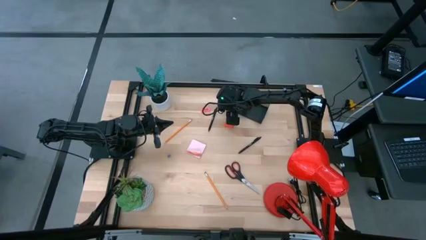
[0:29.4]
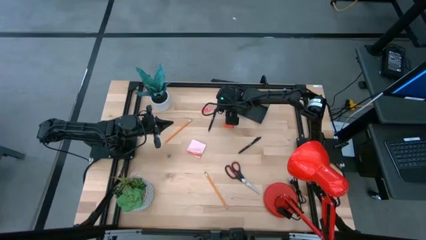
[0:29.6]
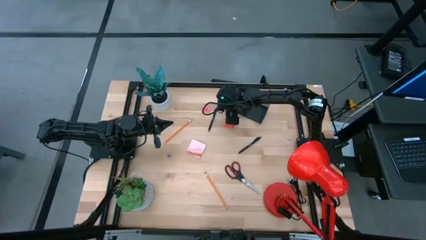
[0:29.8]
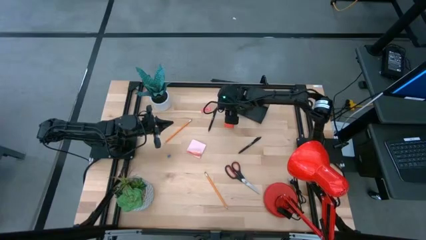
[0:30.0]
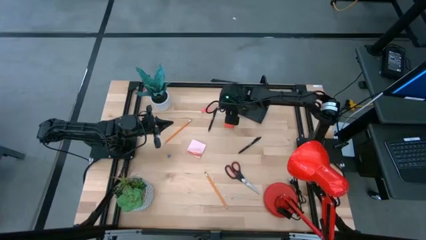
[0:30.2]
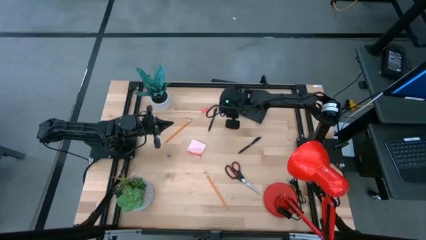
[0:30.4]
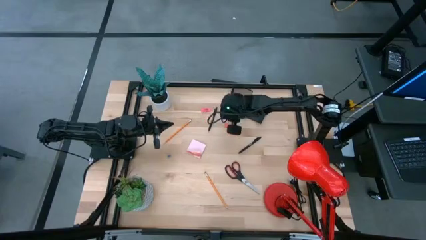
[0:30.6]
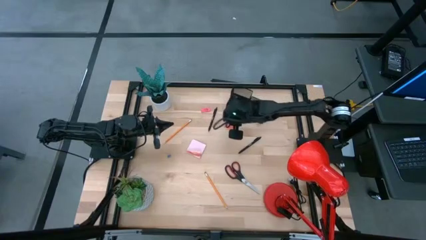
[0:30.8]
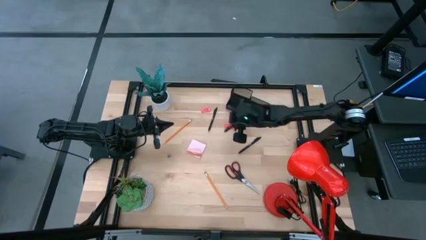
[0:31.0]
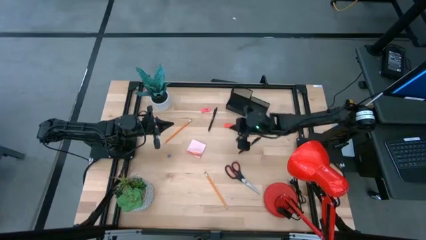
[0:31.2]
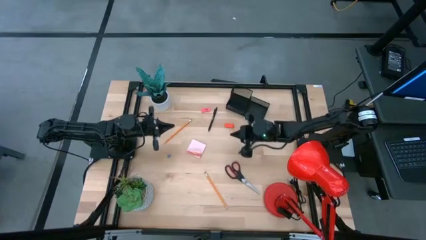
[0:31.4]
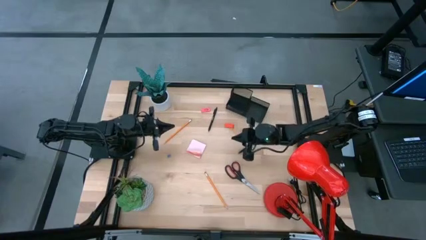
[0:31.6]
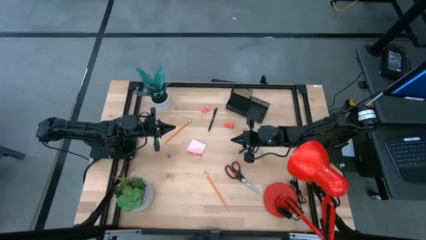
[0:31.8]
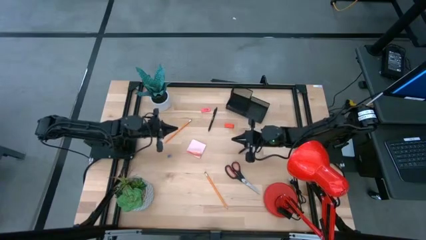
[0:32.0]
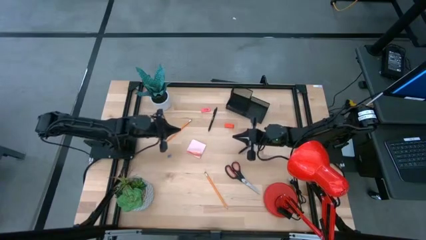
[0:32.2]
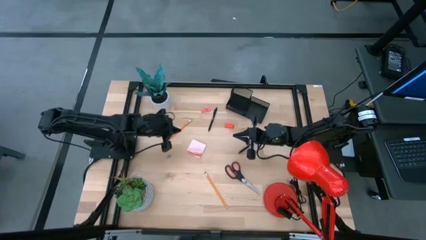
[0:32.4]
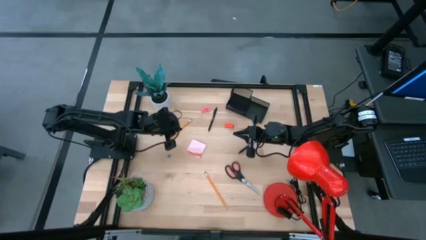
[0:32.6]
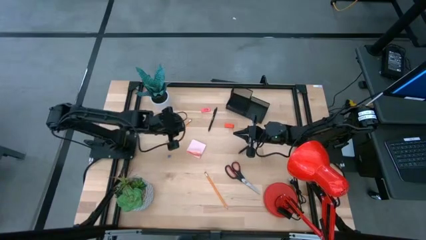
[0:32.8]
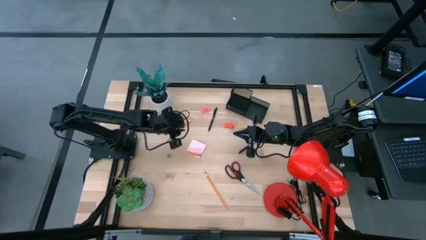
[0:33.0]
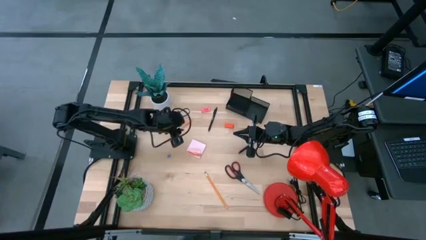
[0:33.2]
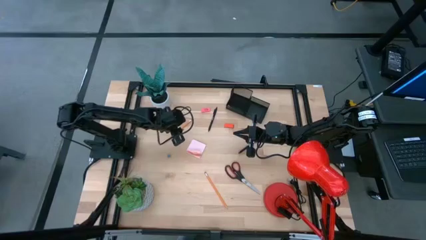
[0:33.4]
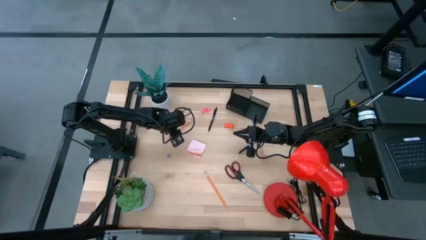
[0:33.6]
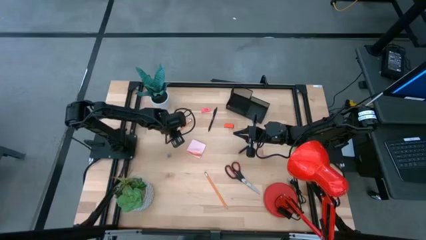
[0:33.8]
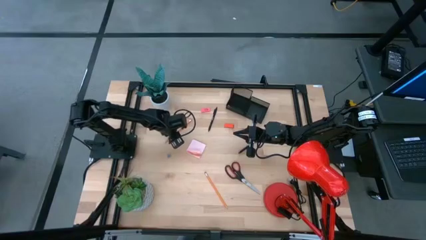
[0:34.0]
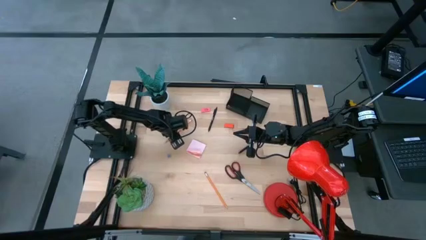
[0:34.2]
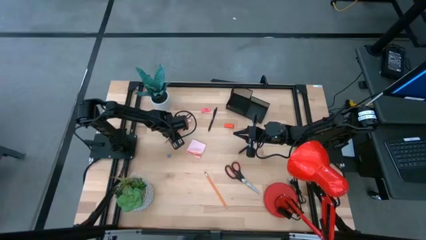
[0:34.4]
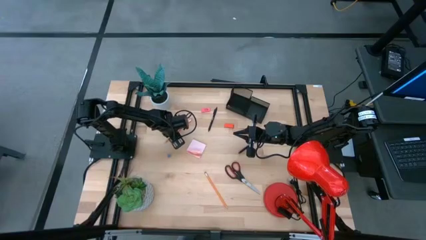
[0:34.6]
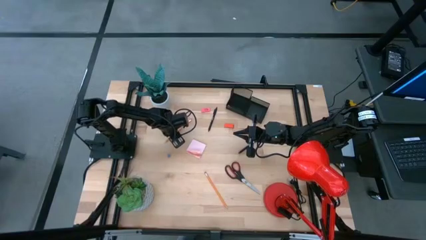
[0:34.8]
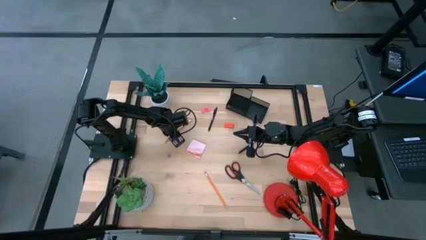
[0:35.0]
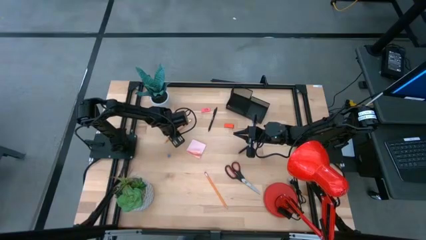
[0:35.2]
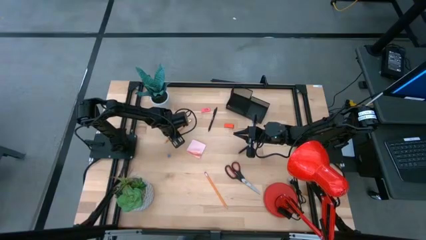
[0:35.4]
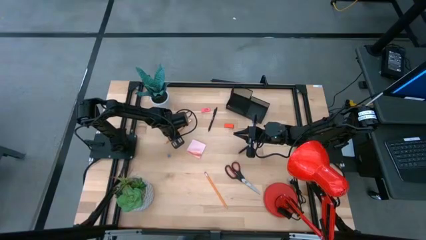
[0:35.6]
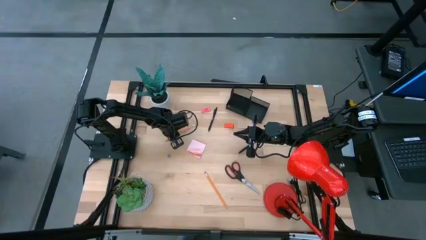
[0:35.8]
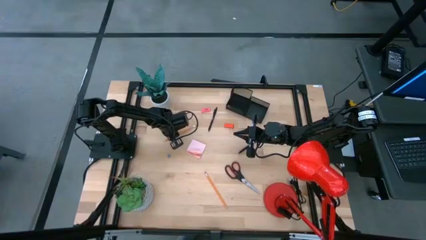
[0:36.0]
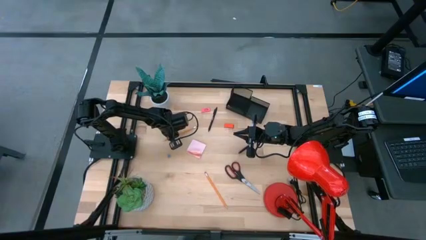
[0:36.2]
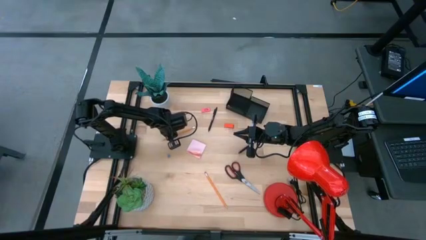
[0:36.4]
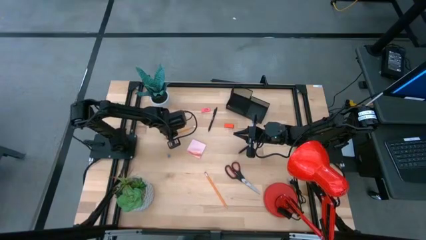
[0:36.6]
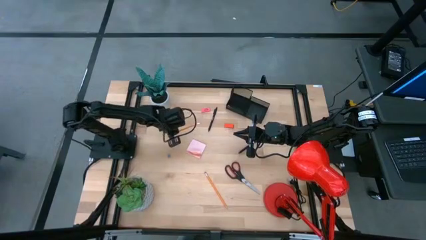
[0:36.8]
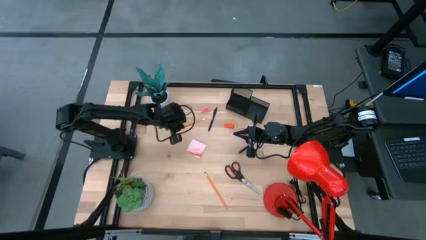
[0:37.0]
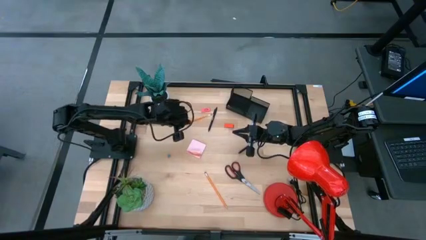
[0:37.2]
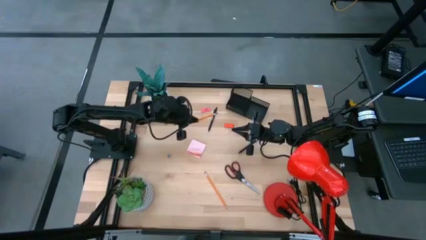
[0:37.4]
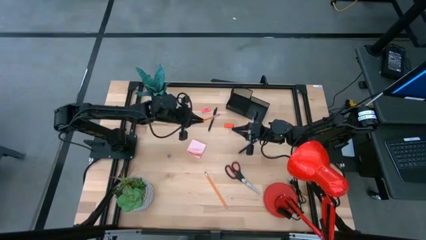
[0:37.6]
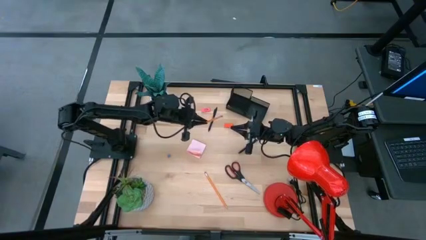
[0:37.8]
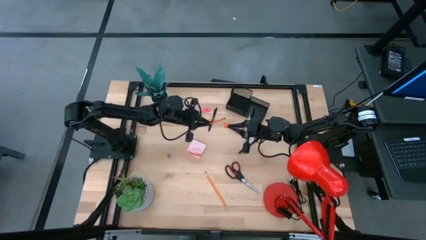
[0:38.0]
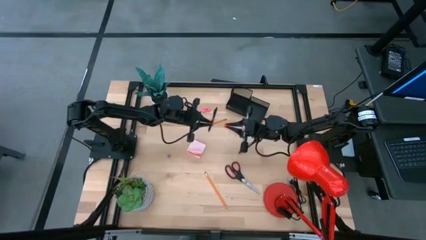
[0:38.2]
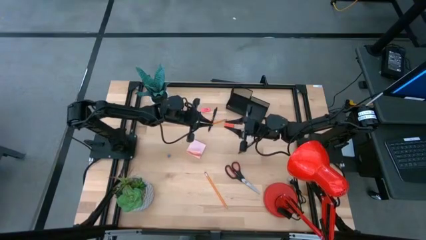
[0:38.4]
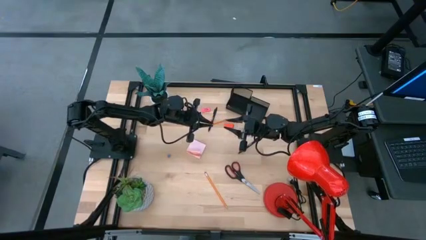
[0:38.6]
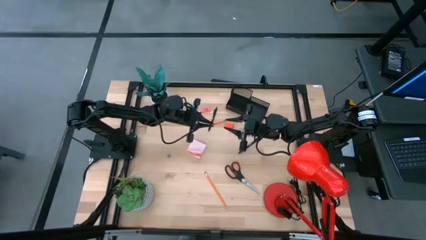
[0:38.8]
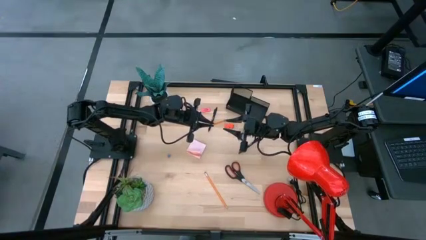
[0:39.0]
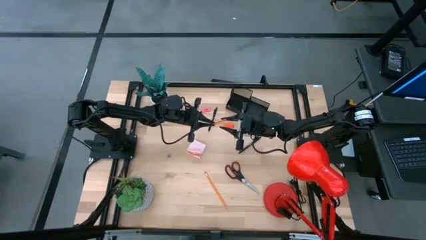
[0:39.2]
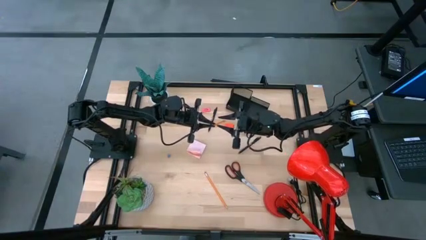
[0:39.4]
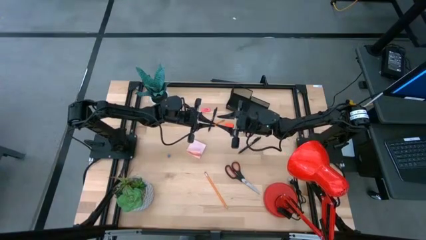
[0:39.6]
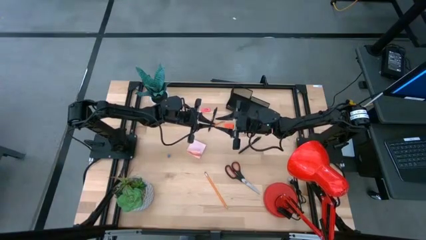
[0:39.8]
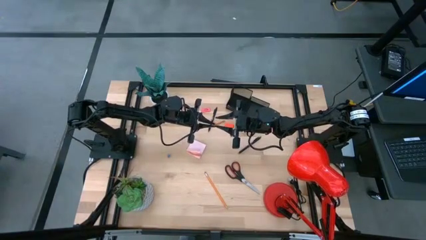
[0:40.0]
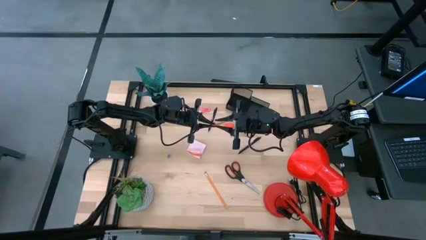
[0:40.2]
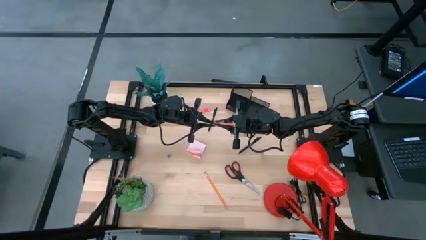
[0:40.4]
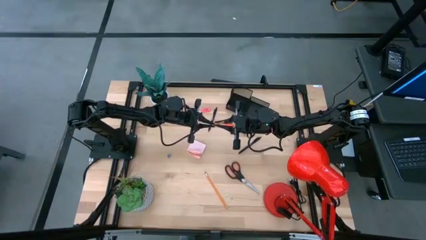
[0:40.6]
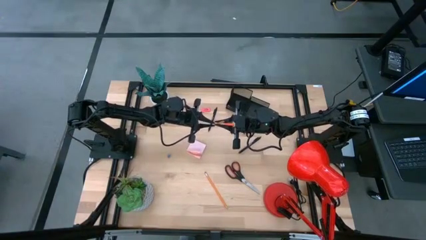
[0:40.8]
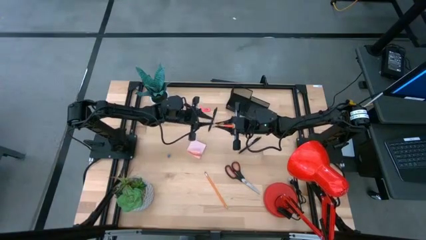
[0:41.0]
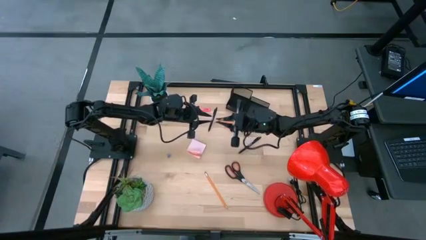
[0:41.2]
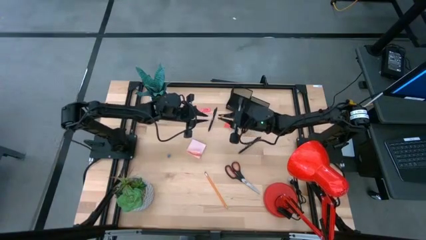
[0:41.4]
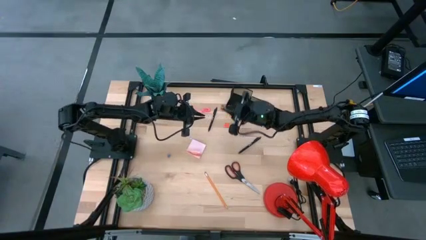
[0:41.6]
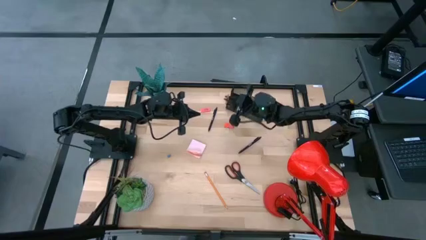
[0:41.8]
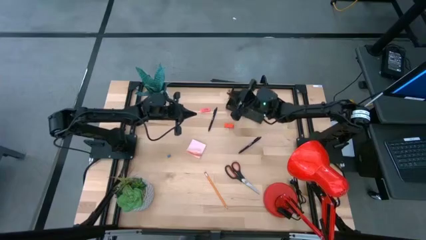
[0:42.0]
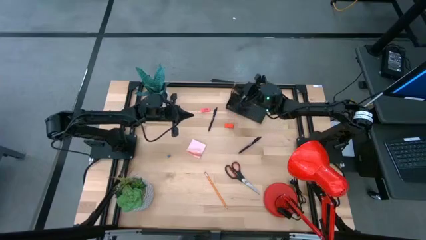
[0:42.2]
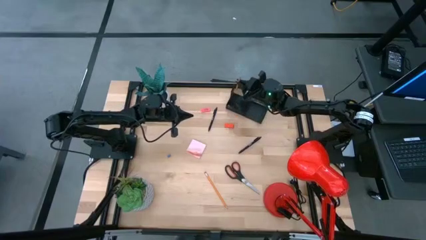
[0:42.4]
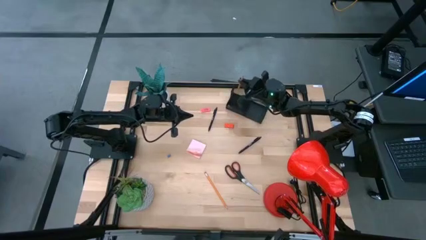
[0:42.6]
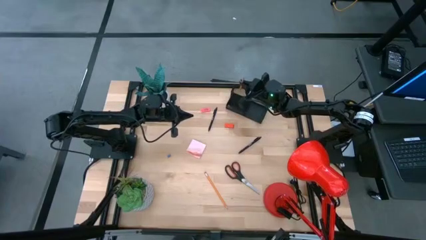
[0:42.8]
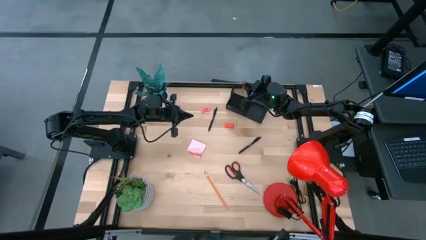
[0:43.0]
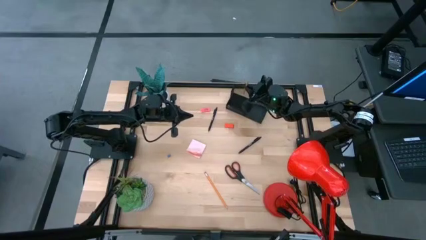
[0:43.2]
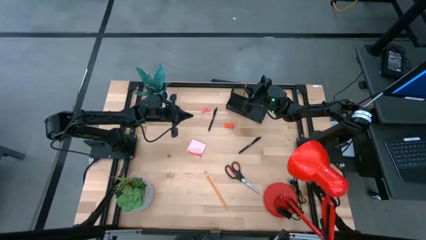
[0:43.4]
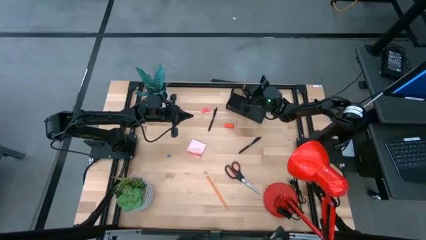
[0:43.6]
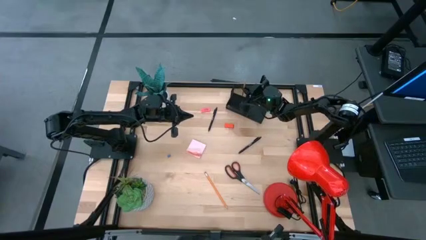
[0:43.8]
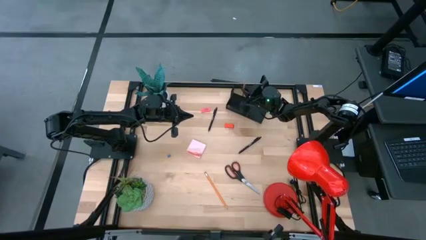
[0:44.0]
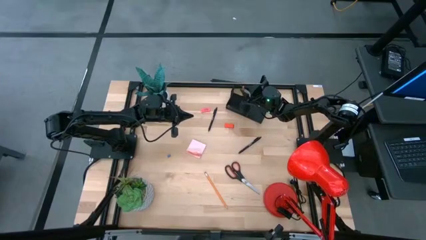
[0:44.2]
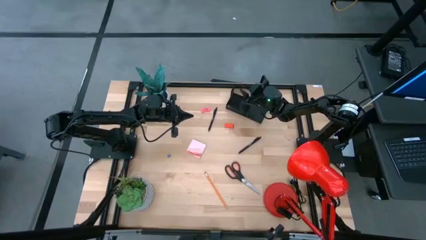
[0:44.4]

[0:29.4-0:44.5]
Task: Pick and place office supplies into organizer
Put the top pencil into the black desk organizer
